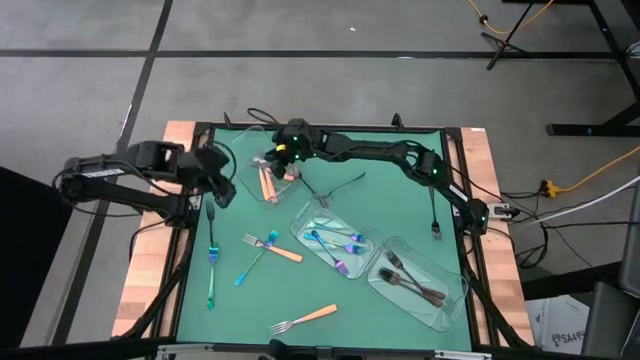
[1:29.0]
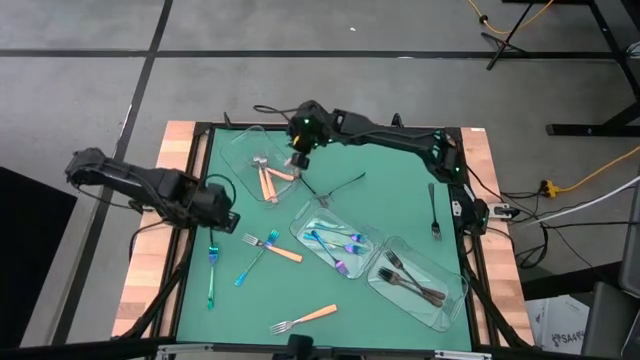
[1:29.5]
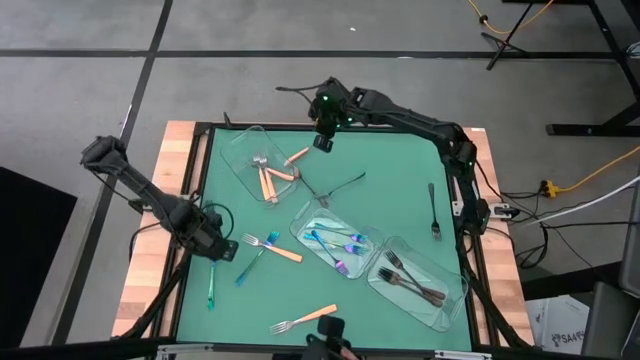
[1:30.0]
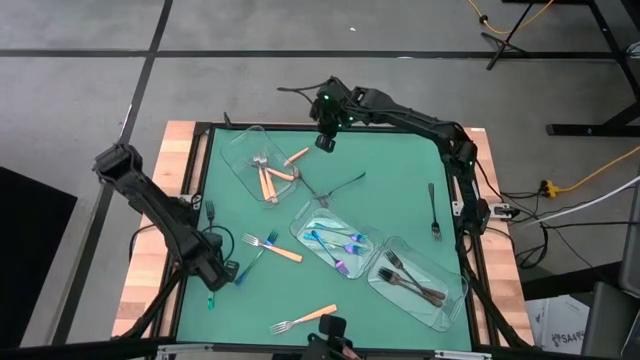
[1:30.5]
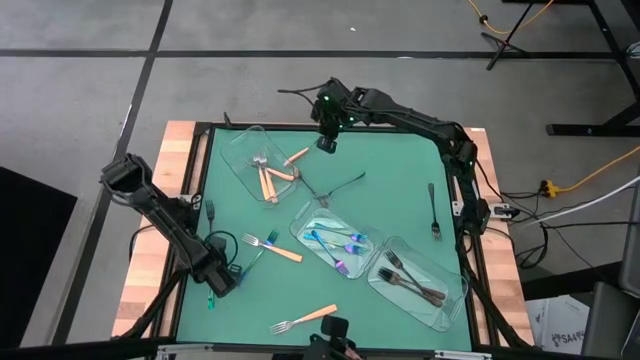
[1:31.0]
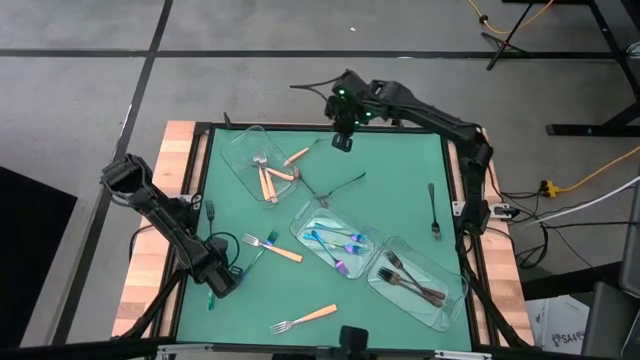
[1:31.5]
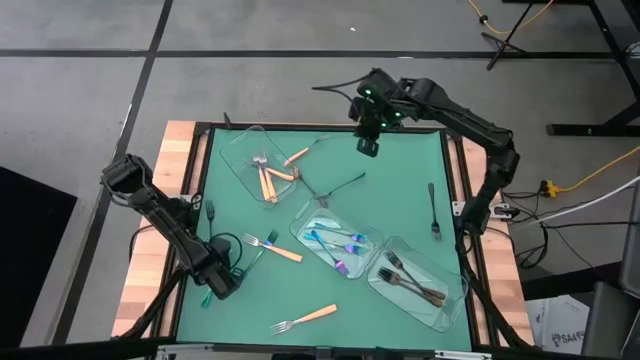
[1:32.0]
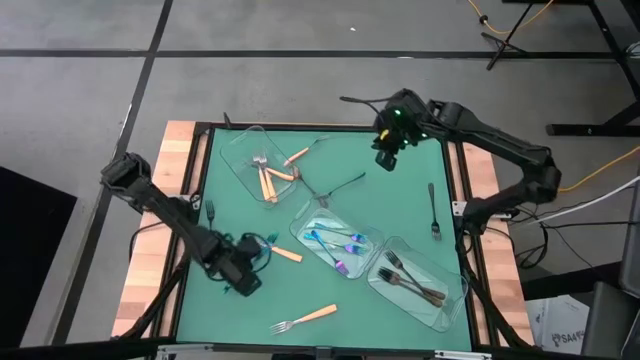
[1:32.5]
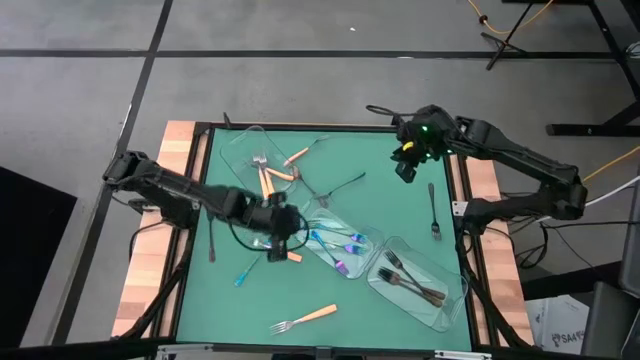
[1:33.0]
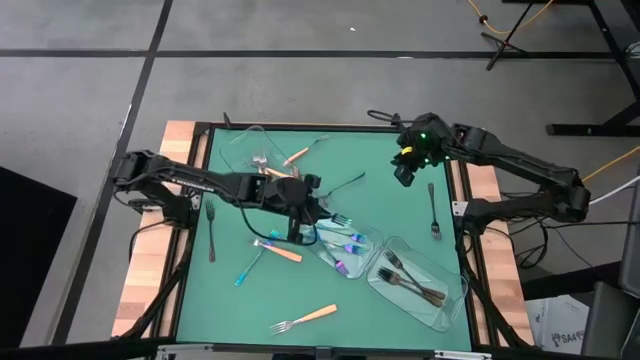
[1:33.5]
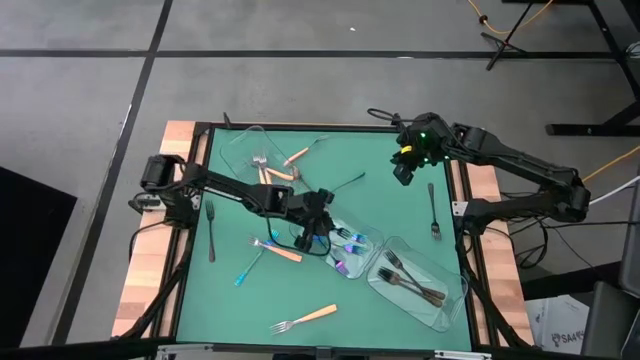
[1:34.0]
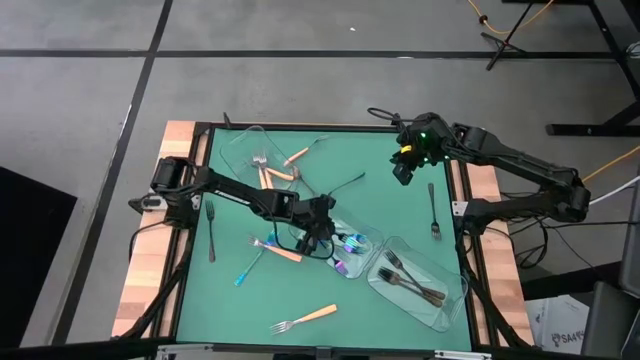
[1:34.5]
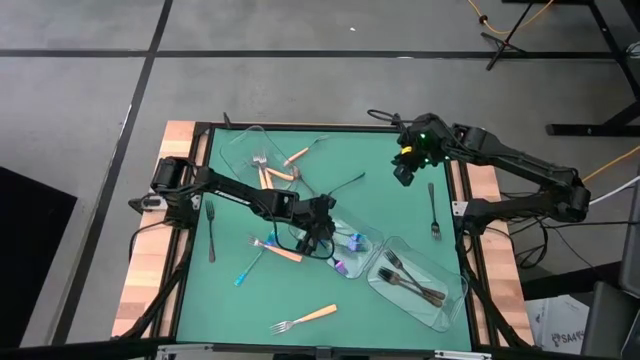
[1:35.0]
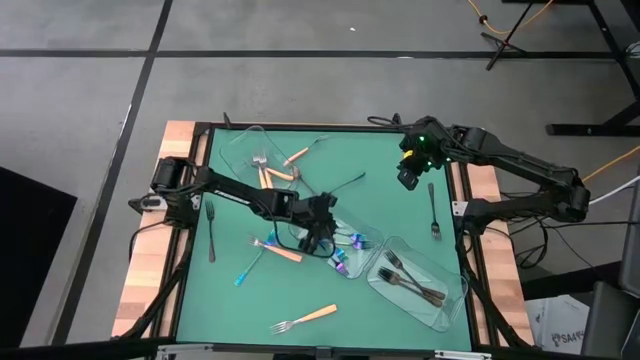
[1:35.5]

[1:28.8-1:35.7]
Task: Sort silverware by color (type)
Put the blue fork into the center transparent bin

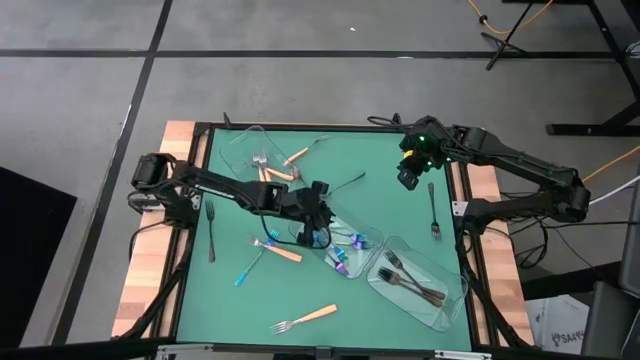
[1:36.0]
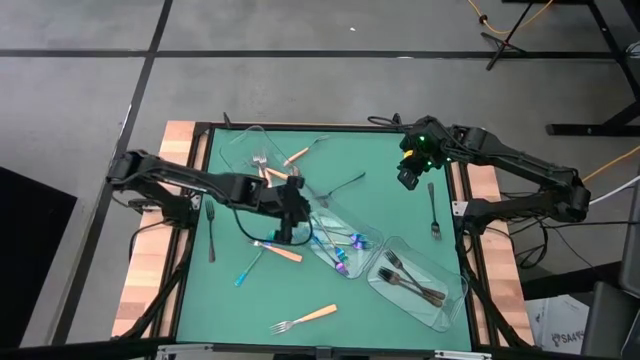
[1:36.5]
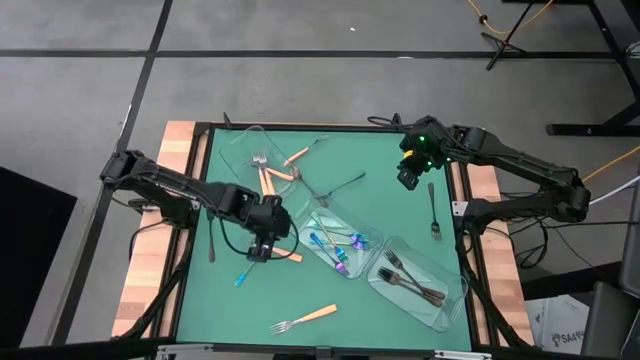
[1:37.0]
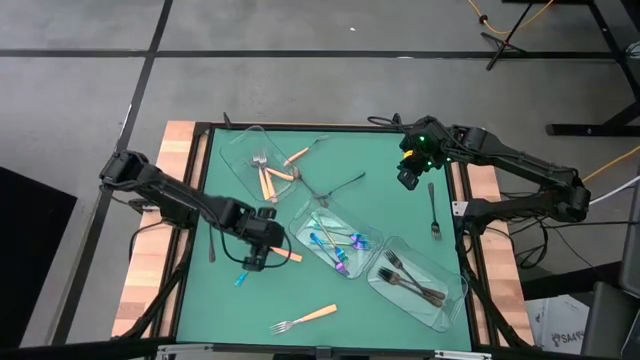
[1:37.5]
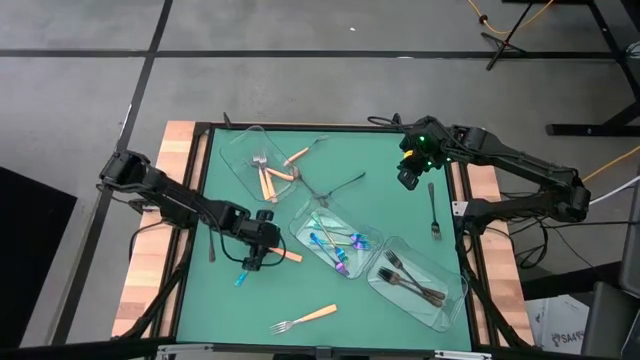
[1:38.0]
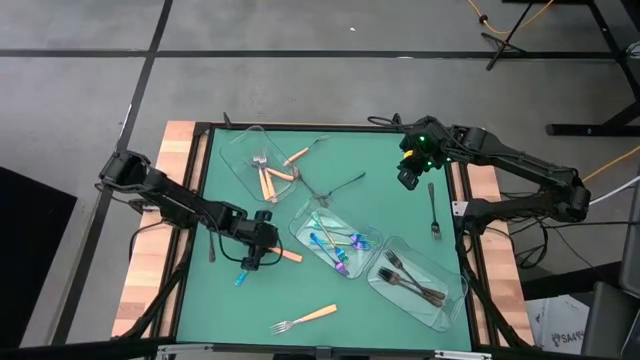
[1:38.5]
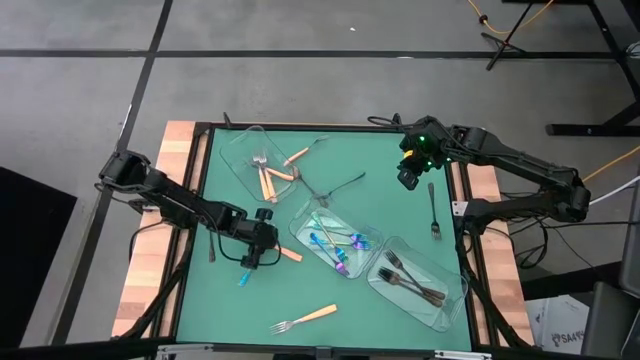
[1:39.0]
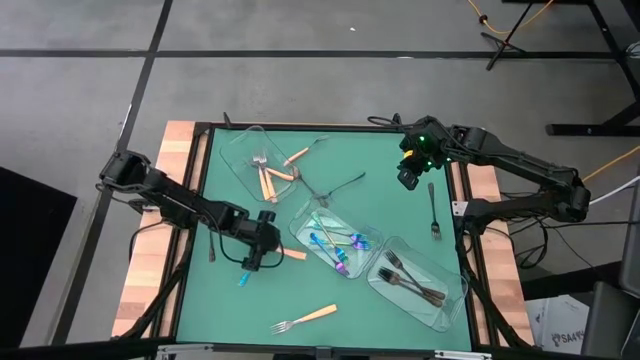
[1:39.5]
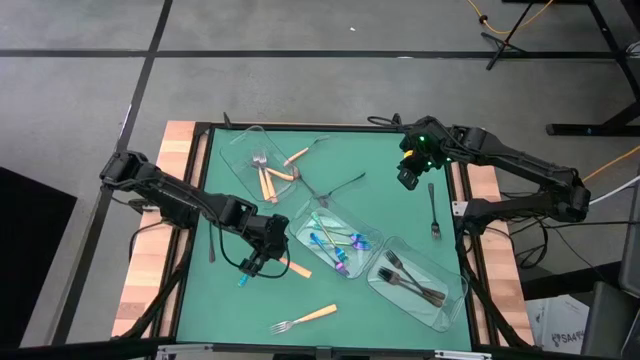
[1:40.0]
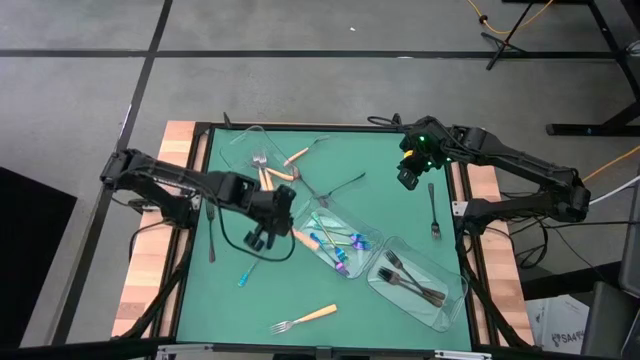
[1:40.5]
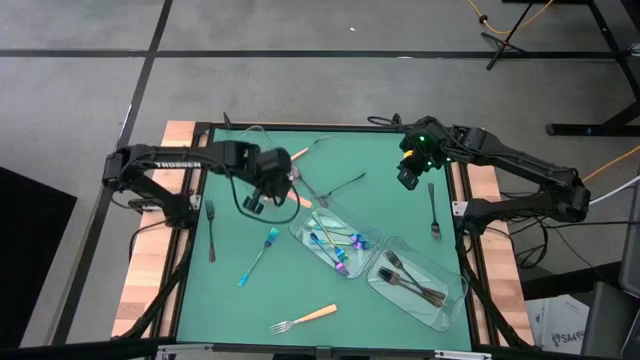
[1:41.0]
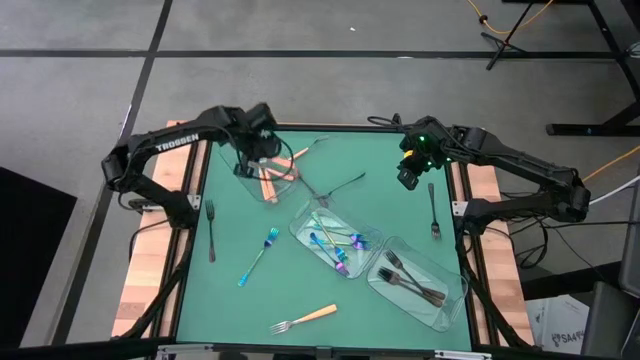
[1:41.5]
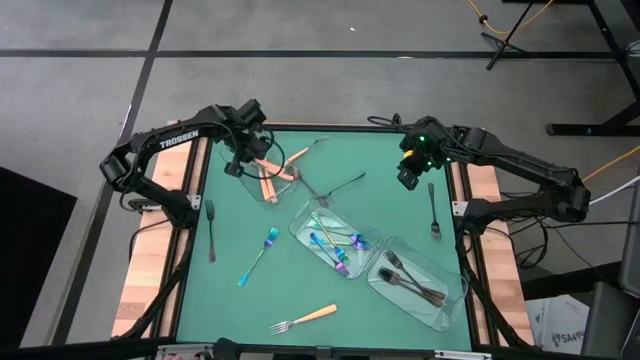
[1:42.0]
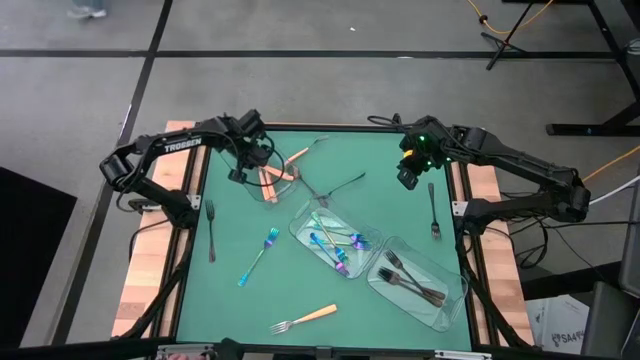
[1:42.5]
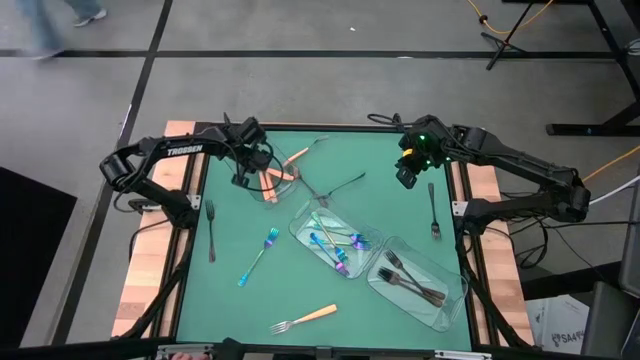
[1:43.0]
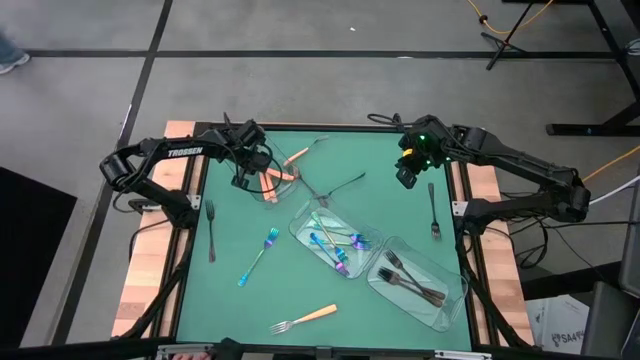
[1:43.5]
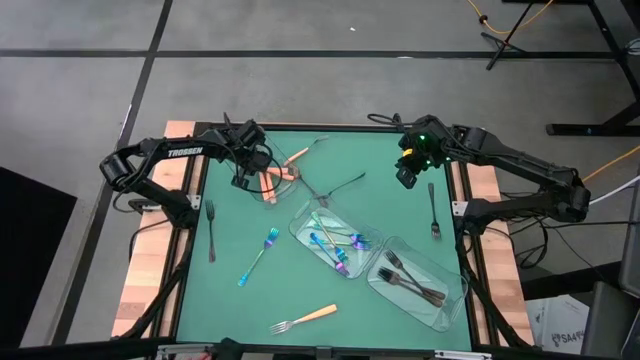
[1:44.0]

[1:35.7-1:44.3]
Put the yellow fork into the top transparent bin

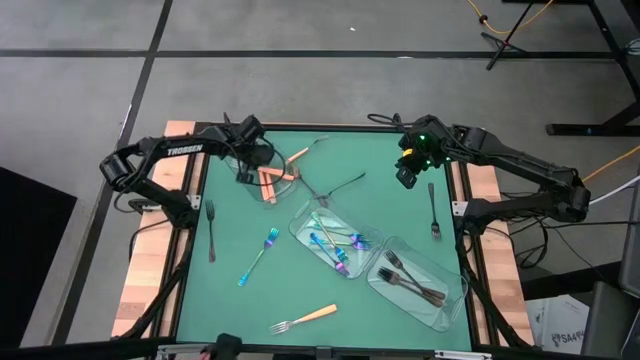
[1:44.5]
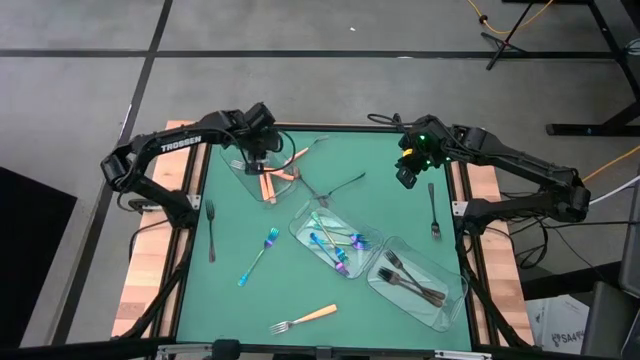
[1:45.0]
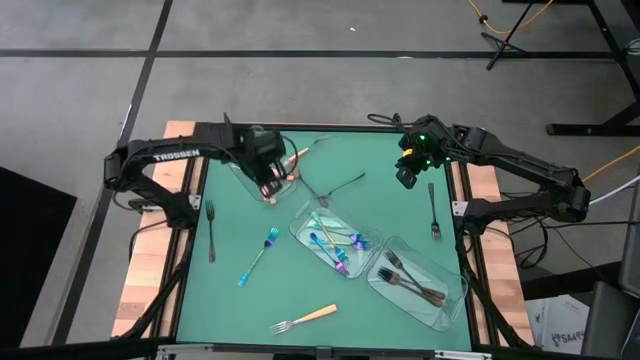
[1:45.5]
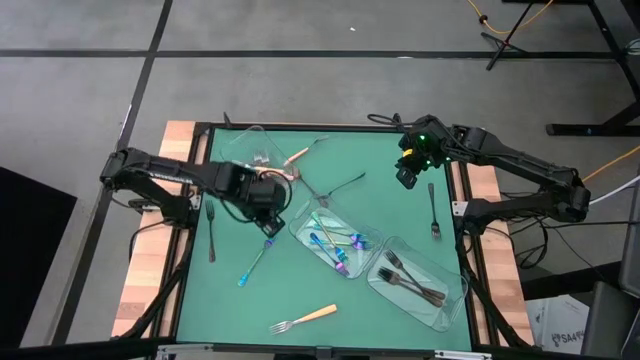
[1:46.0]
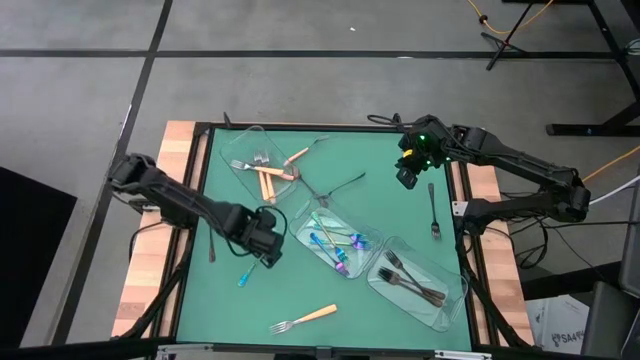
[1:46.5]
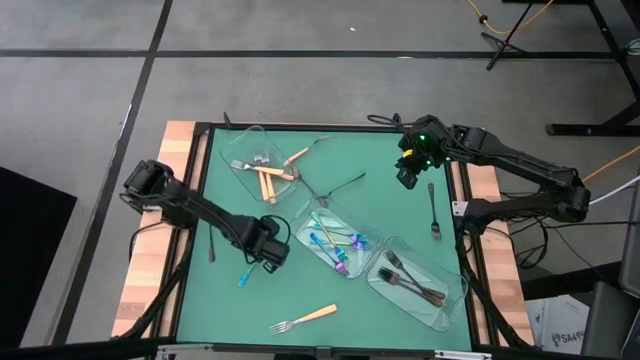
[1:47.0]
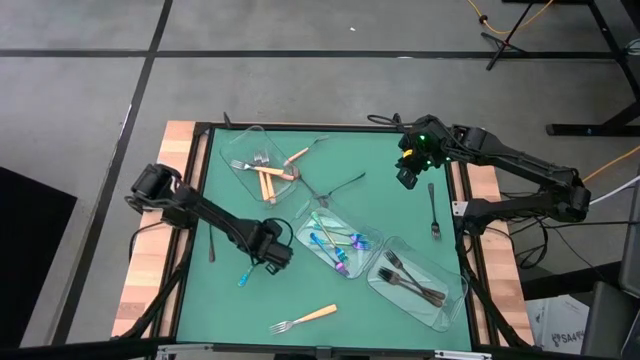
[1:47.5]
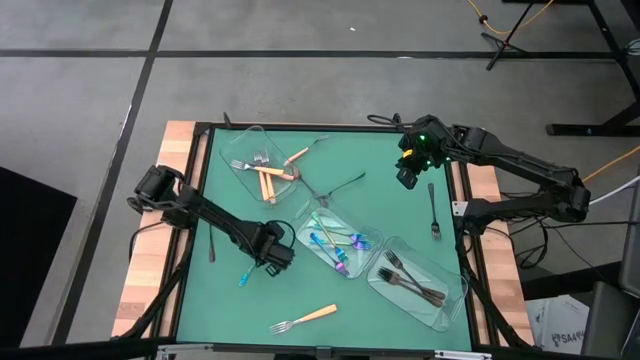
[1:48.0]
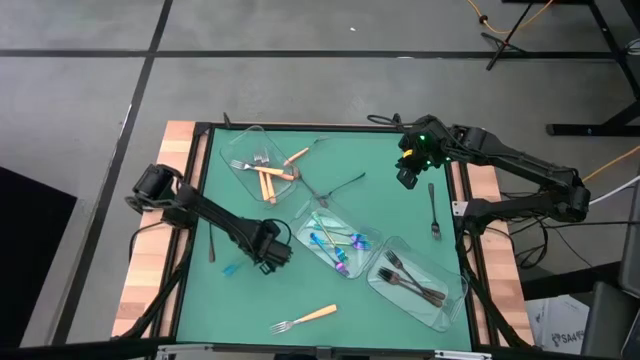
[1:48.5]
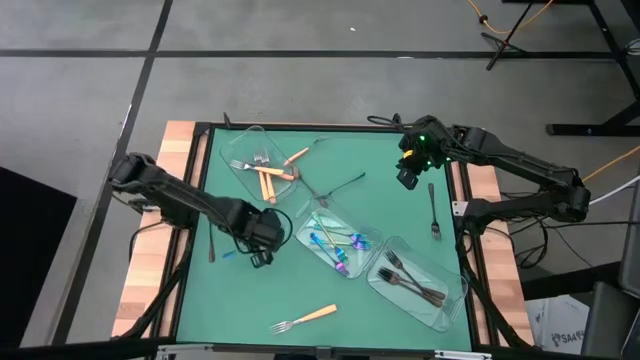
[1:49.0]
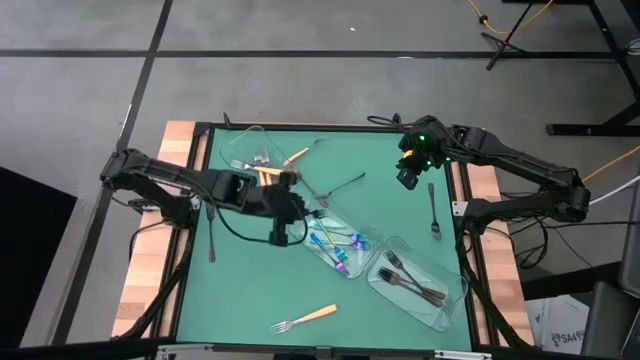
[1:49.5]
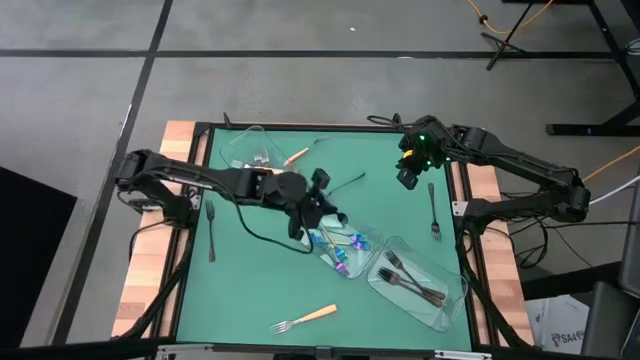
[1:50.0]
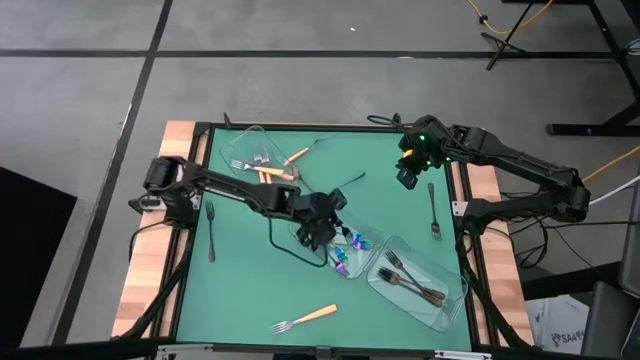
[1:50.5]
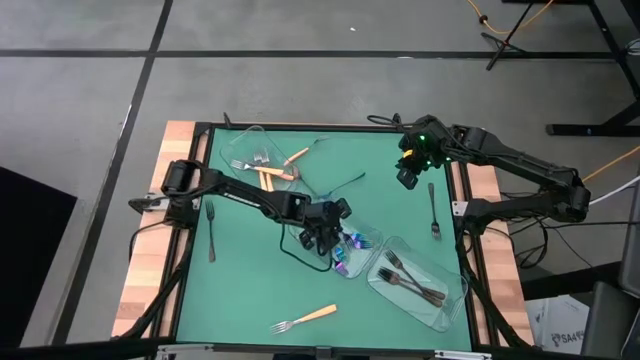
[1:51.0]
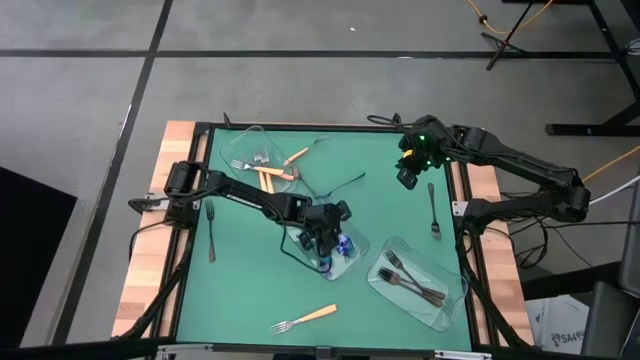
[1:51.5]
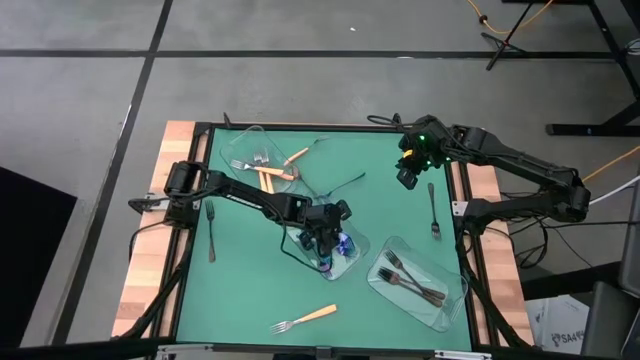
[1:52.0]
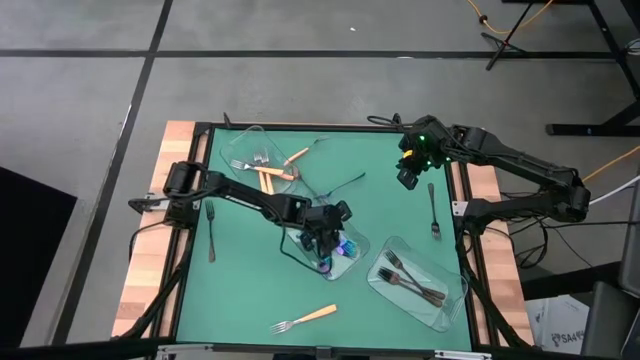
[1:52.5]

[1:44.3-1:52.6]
Put the blue fork into the center transparent bin
